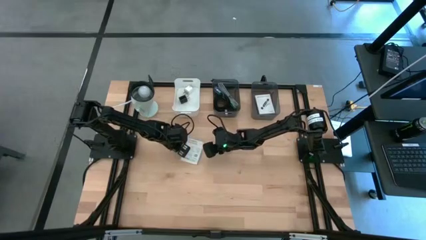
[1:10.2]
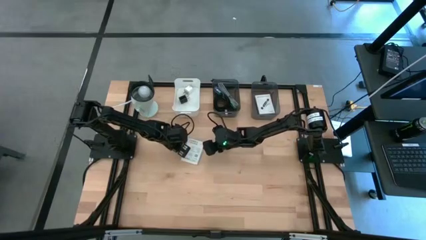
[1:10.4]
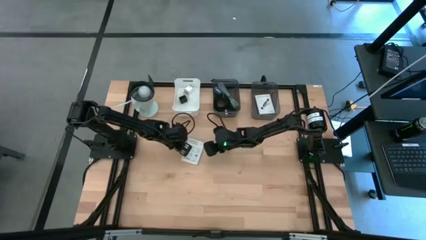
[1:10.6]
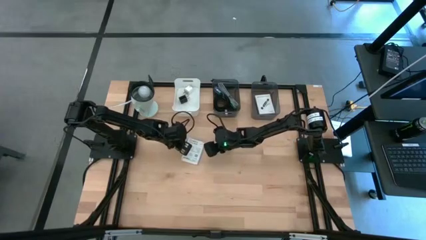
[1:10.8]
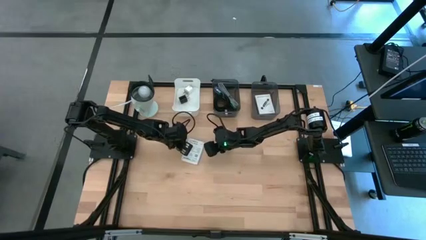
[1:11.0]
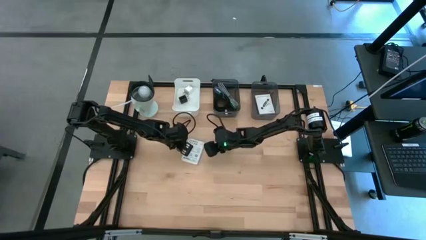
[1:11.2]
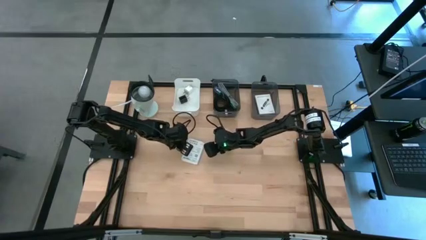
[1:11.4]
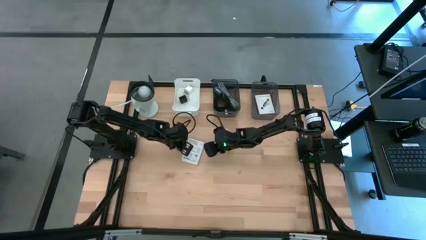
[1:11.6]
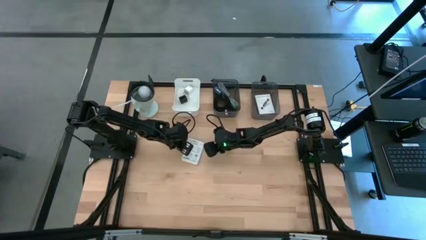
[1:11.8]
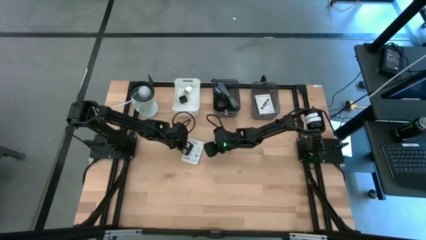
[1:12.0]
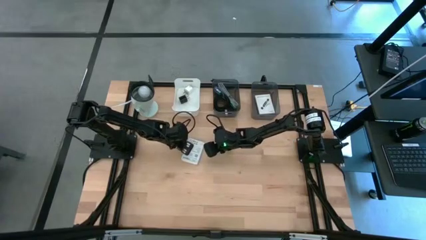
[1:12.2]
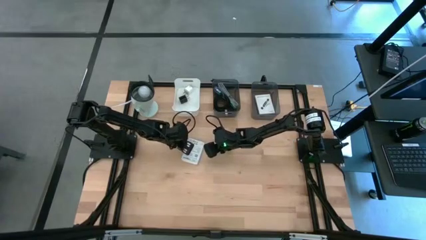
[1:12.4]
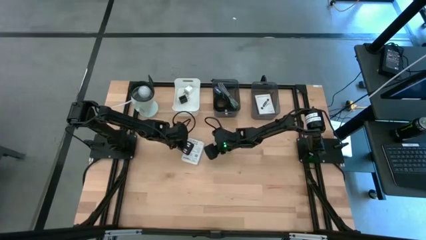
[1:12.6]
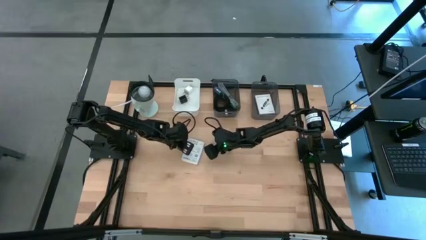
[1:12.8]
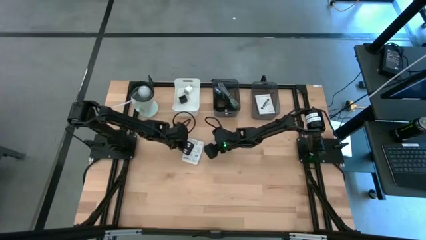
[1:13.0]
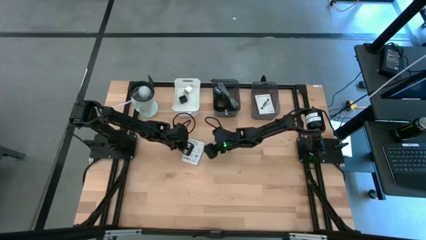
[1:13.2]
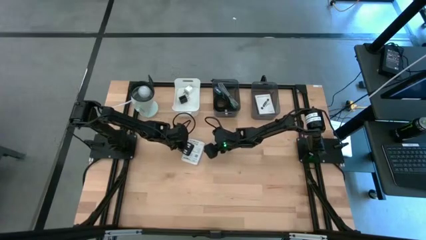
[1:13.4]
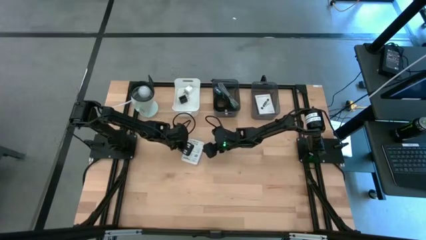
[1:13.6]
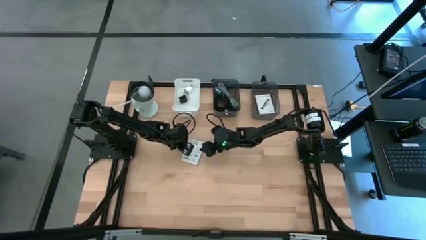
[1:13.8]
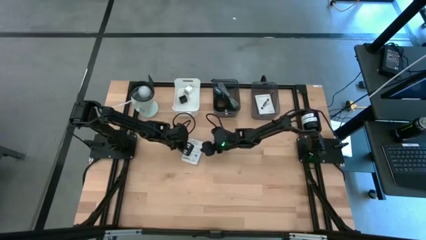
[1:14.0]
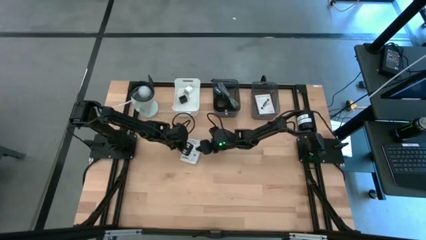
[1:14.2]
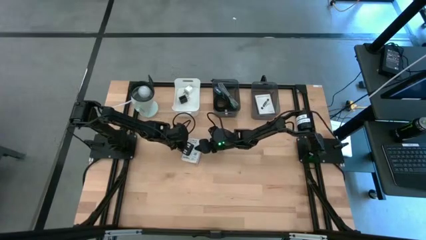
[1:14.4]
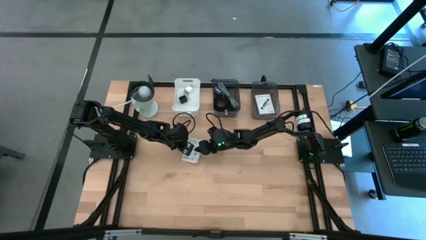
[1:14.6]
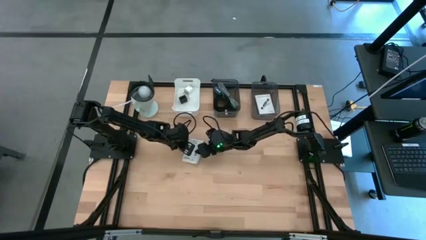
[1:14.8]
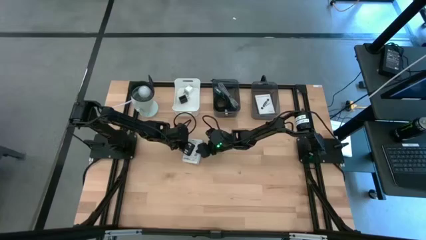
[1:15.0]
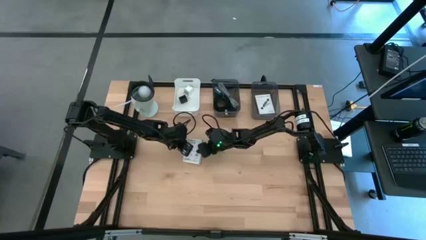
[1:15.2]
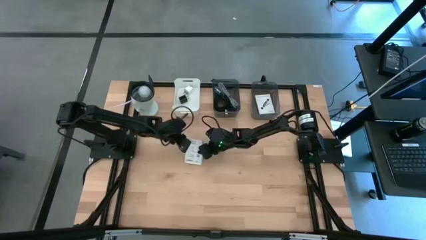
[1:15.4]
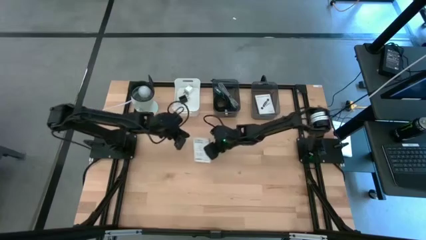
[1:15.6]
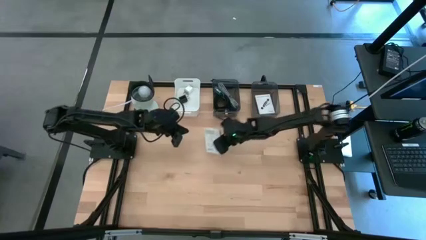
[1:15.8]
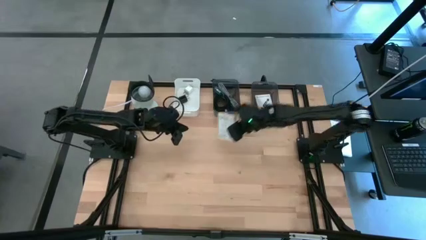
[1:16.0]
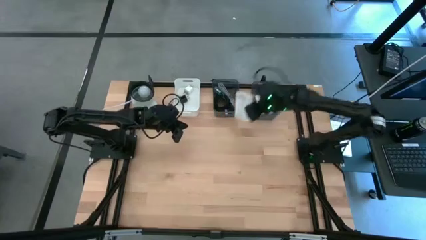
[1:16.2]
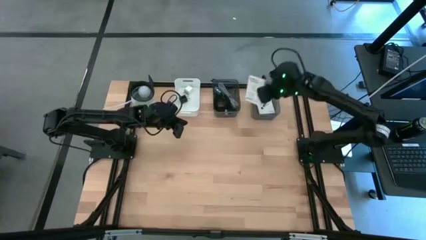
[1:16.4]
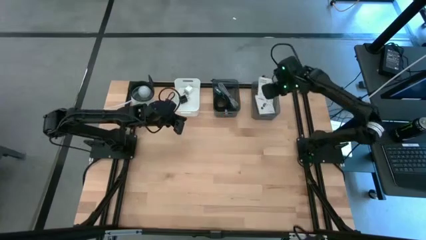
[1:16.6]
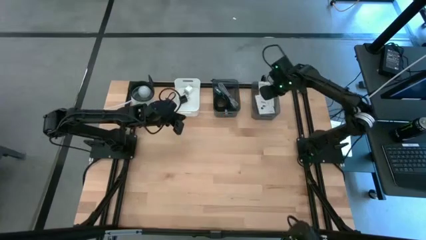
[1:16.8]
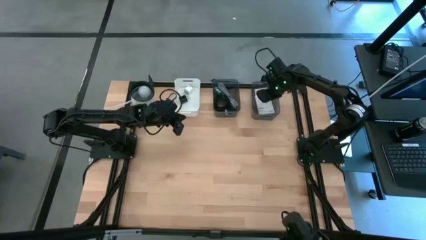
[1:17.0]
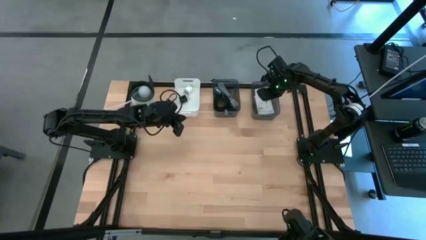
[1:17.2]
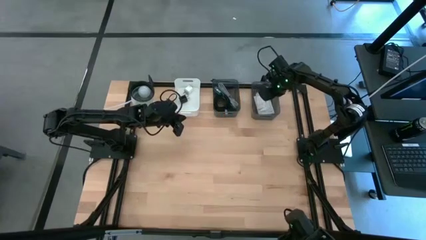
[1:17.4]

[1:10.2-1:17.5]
Task: Pick and place items into bin
Put the card reader box into the right black bin

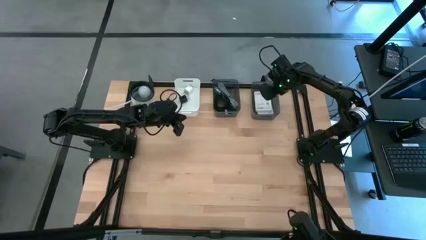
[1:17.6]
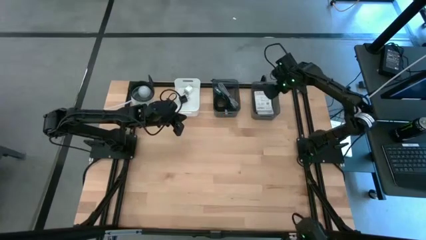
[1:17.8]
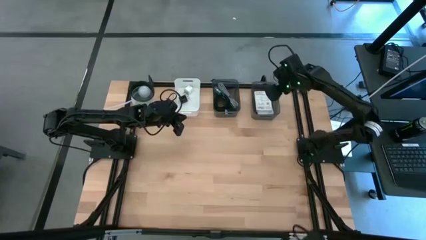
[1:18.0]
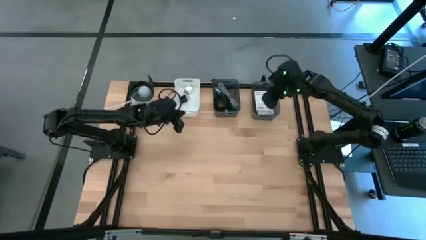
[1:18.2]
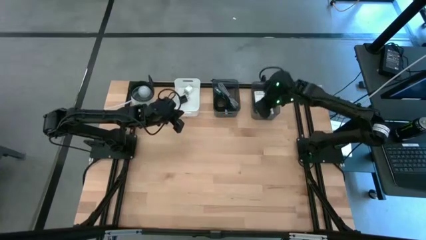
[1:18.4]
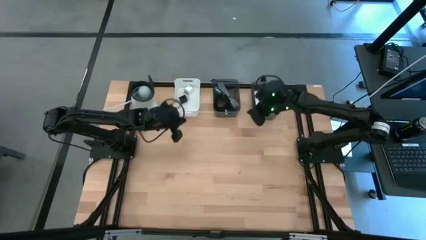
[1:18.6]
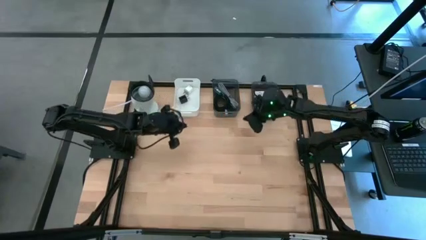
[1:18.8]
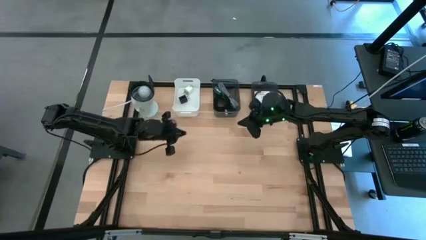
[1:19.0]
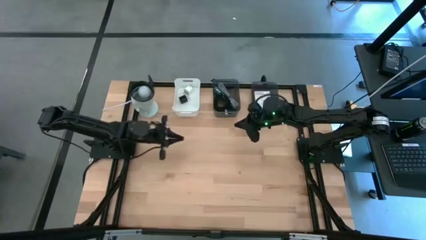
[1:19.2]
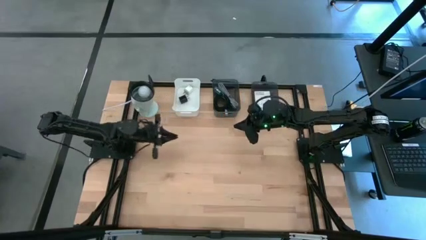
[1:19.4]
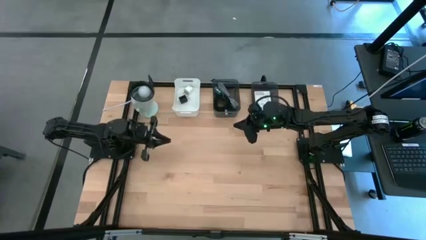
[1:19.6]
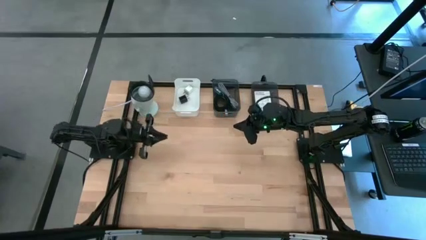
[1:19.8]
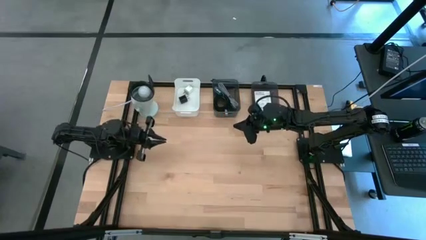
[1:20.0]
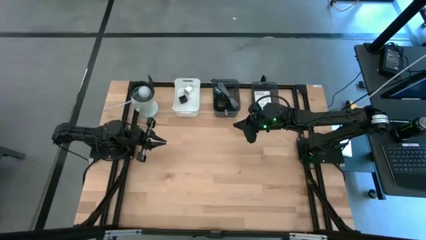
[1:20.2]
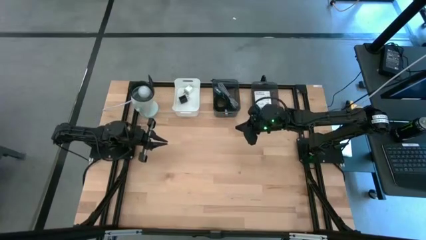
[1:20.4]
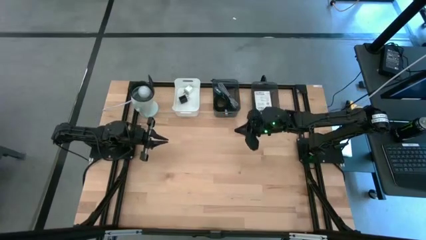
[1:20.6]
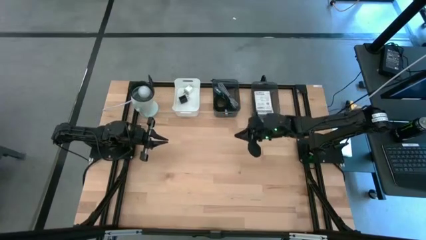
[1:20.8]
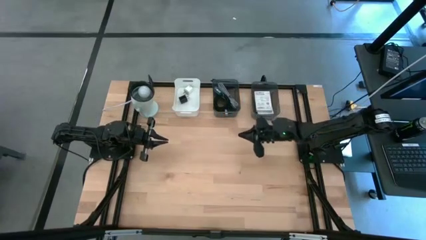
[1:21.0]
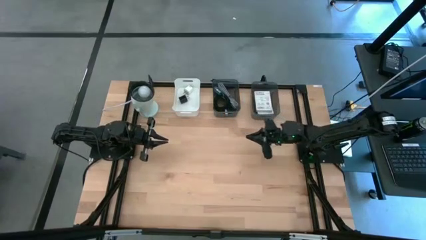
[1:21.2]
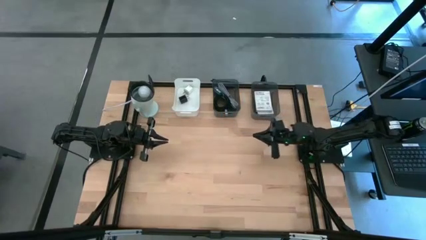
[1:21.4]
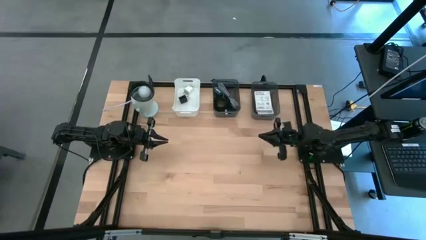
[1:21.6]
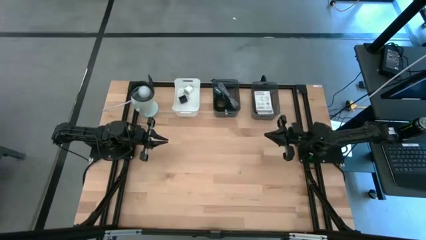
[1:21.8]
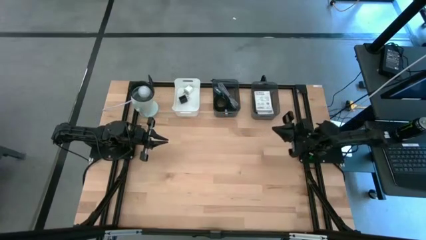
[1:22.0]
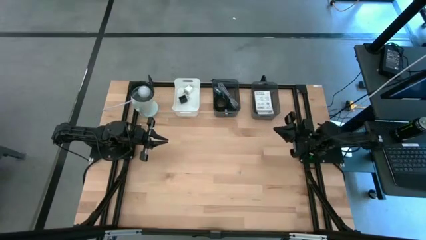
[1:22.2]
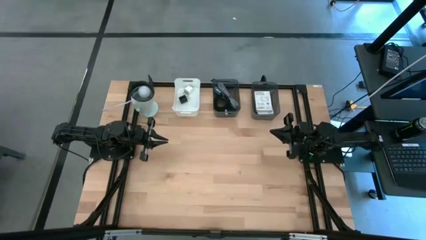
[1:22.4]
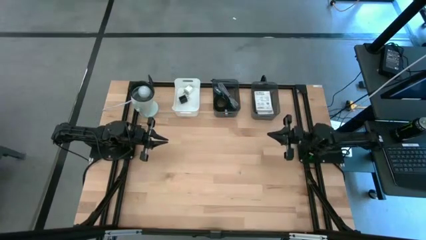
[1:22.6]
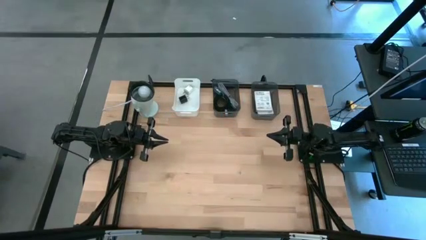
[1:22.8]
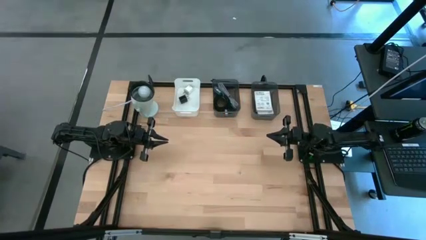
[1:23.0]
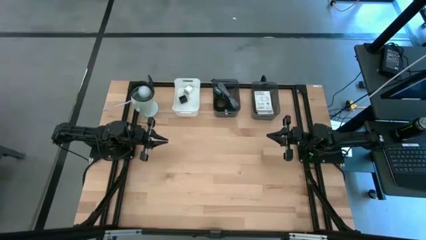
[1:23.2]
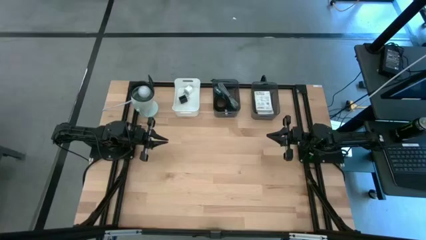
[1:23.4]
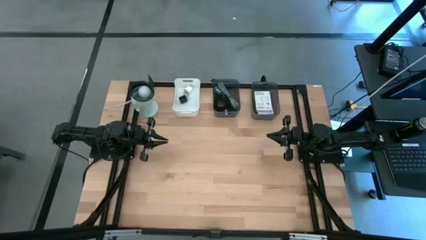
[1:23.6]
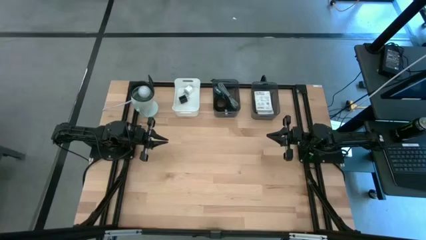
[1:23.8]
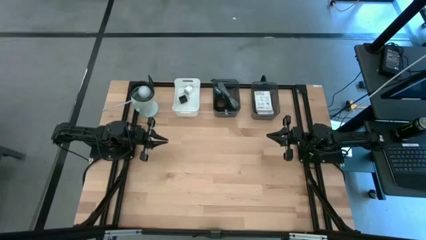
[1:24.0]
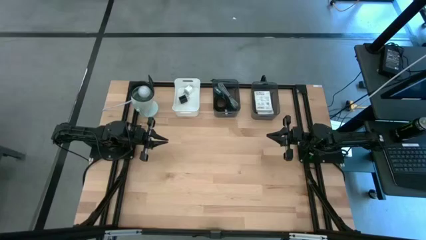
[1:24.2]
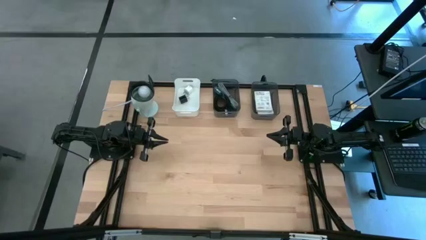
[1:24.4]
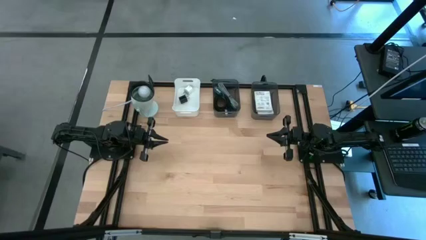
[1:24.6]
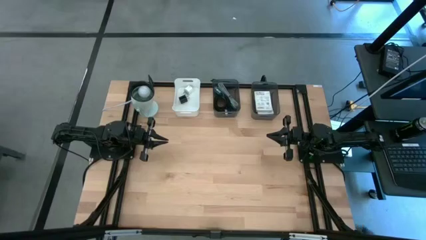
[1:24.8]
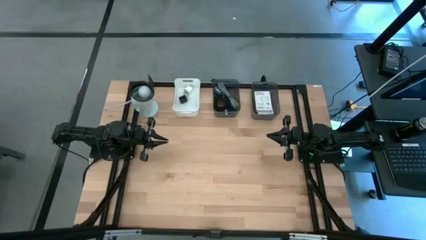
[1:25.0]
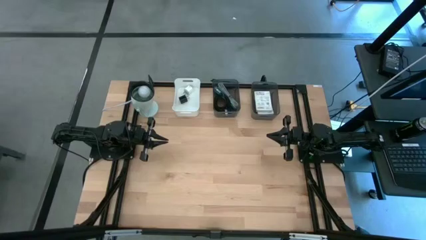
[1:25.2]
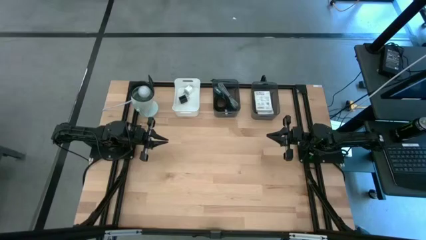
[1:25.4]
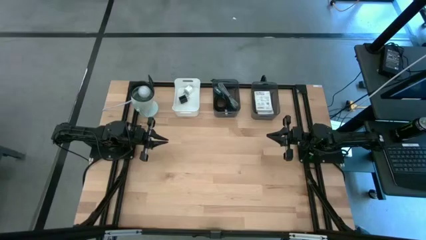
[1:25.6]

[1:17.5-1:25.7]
Return to Home Position
